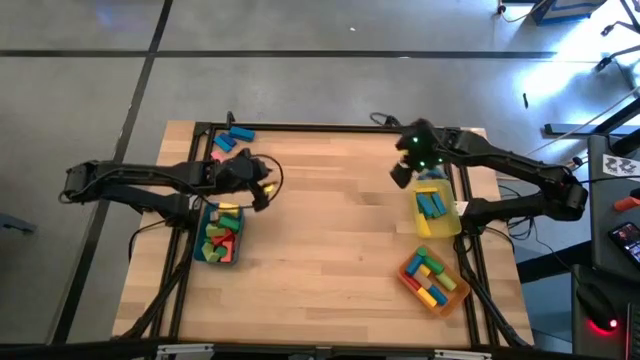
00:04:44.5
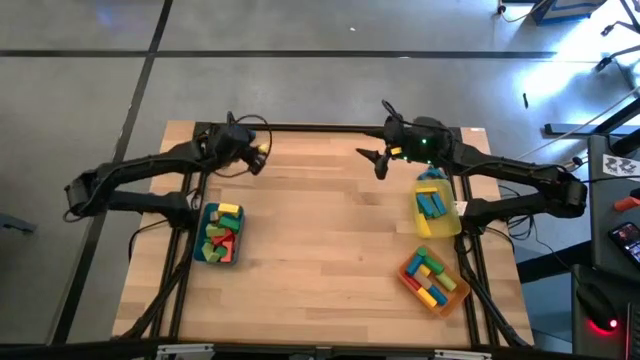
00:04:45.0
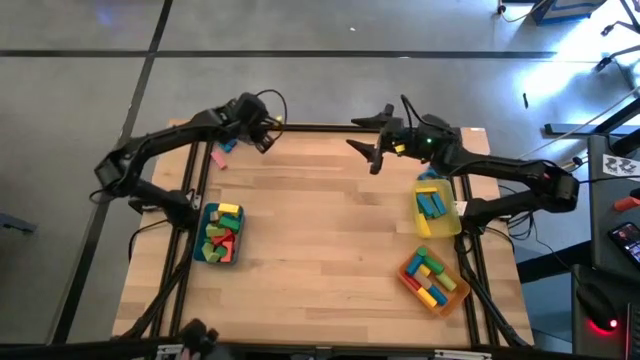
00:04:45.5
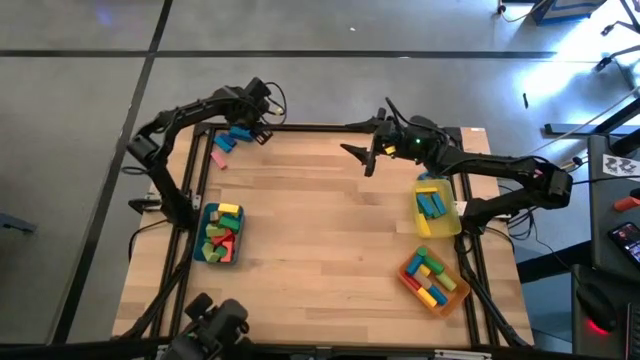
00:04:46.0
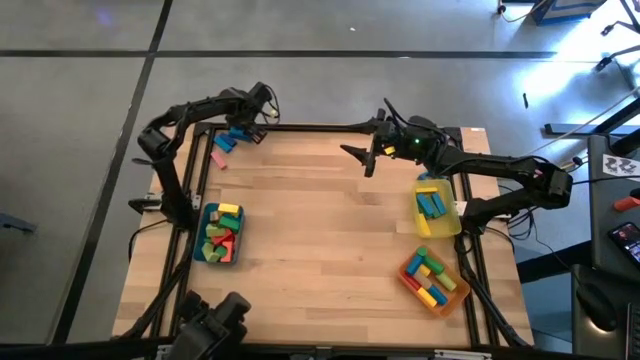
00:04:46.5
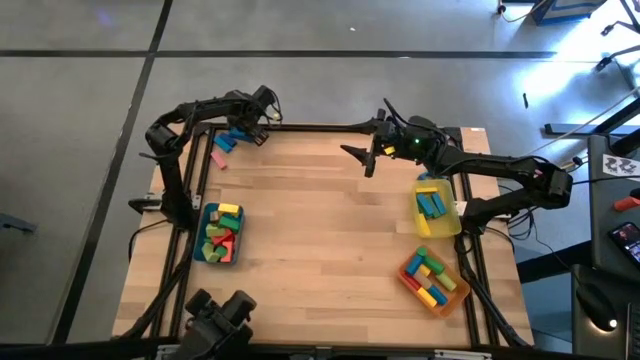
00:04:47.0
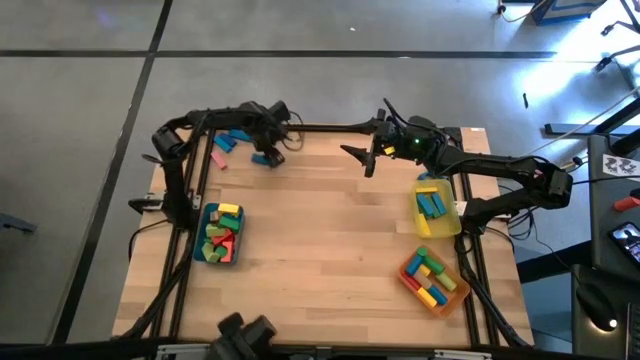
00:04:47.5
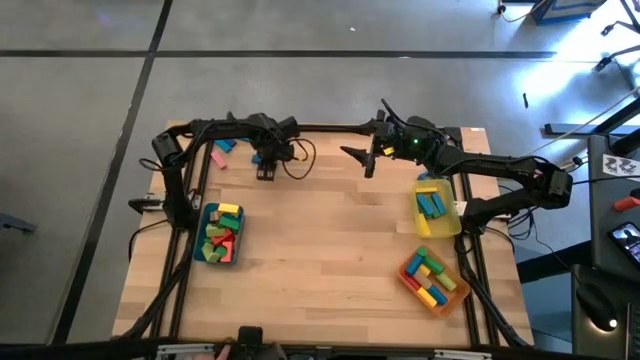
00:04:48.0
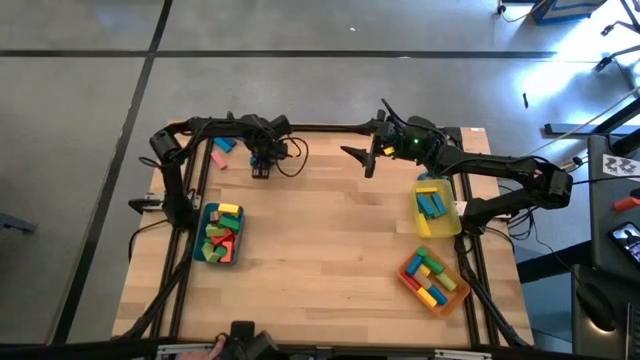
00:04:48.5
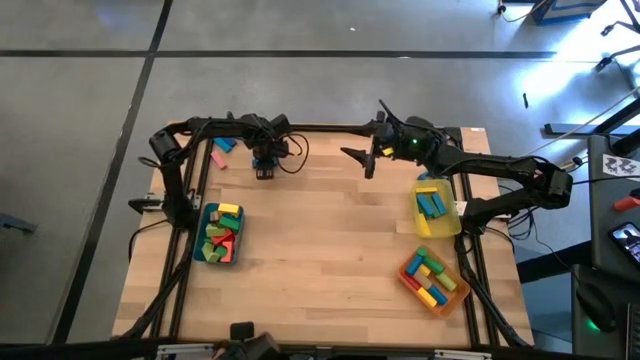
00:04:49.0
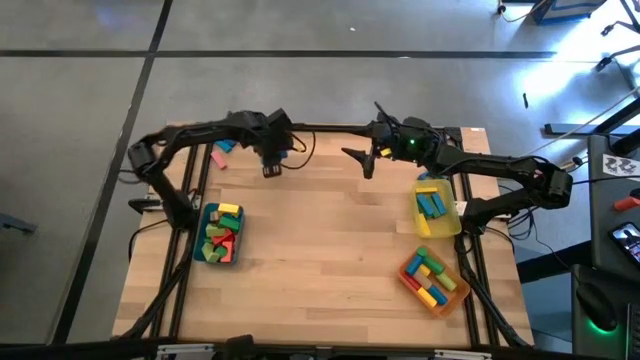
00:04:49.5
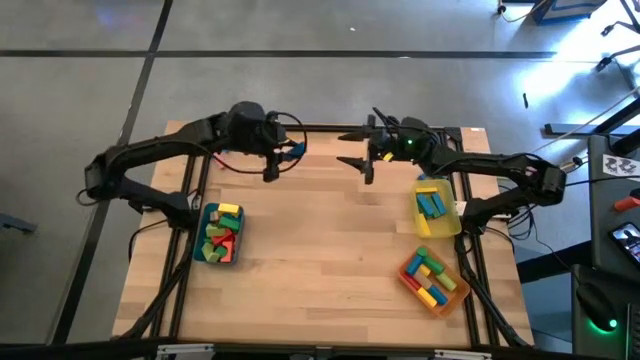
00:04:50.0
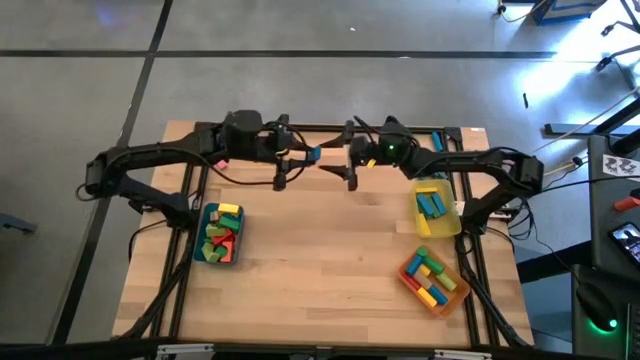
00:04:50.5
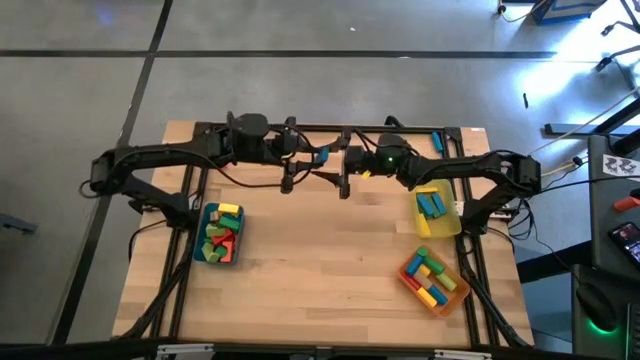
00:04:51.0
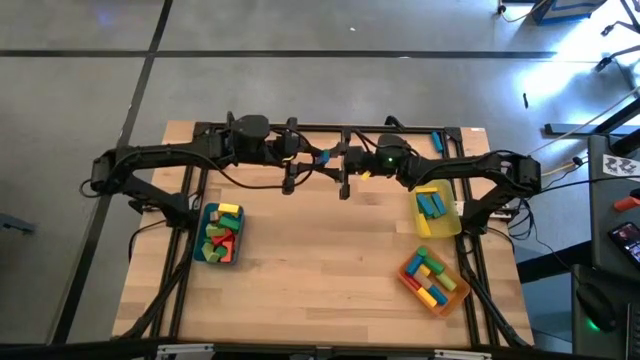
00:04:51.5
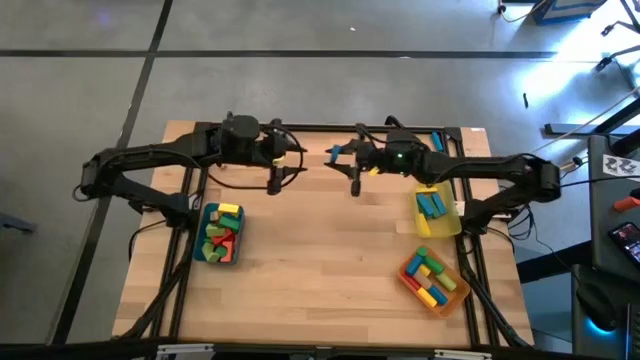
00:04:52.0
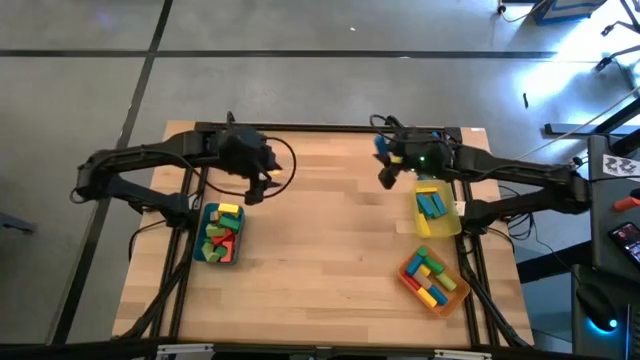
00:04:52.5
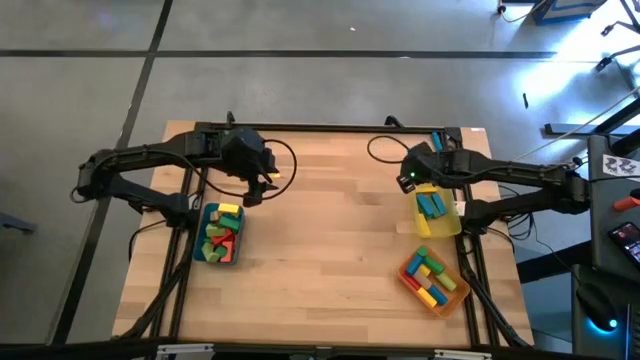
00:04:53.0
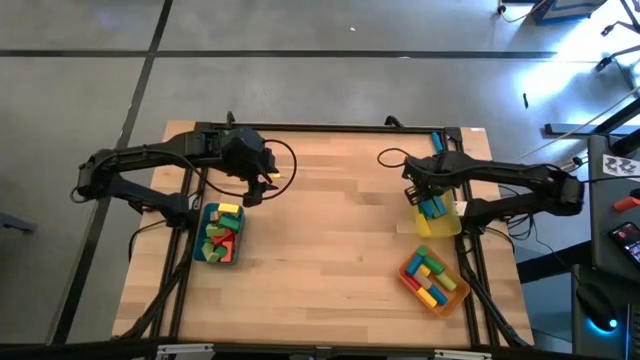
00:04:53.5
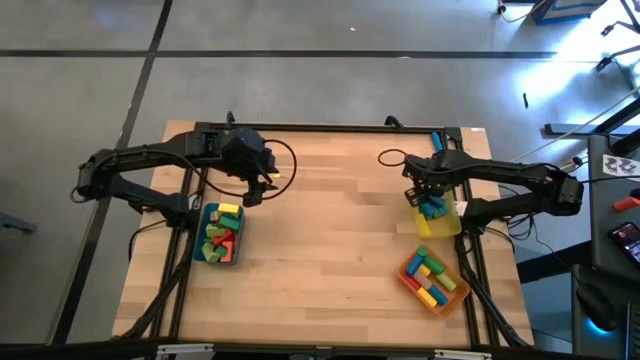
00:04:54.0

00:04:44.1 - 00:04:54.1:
Task: Sort blocks by size
Put the blue rectangular block into the yellow bin

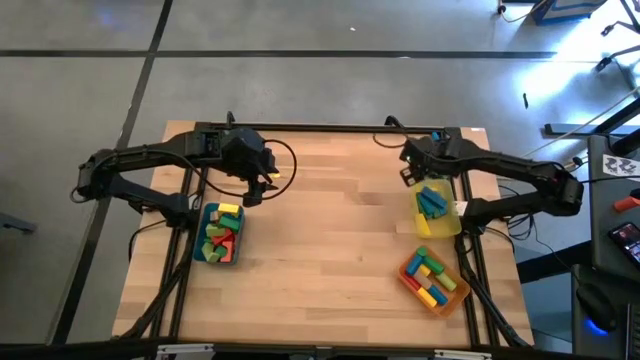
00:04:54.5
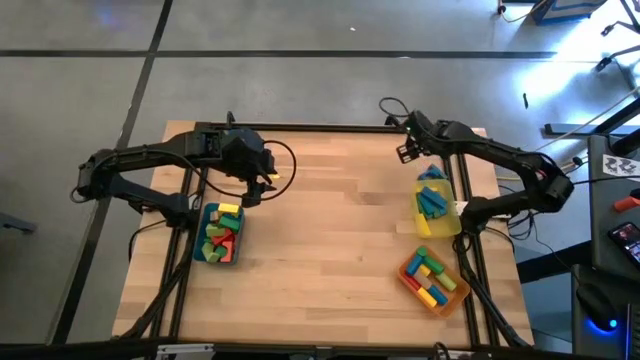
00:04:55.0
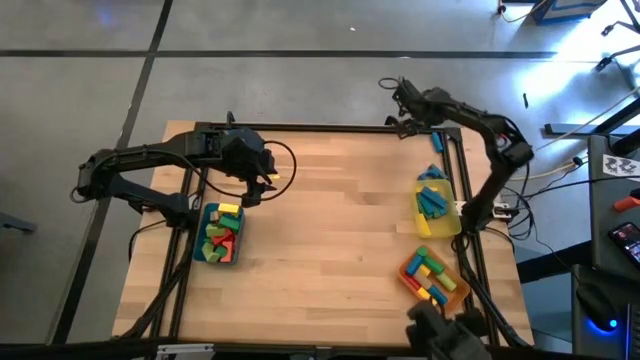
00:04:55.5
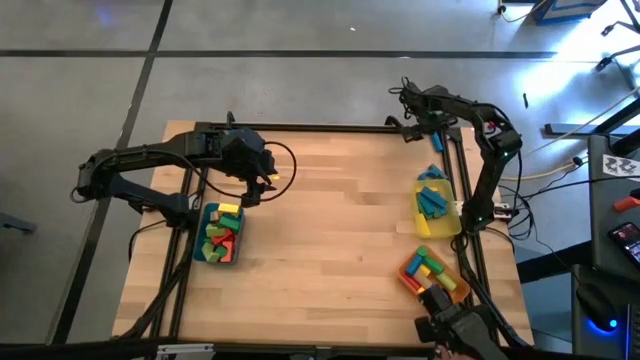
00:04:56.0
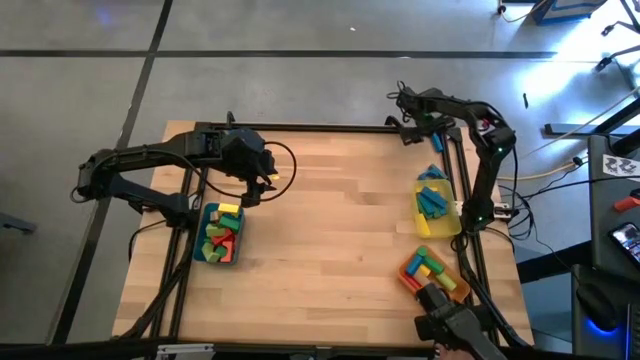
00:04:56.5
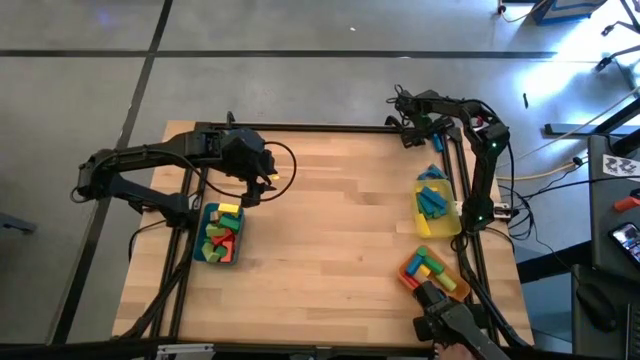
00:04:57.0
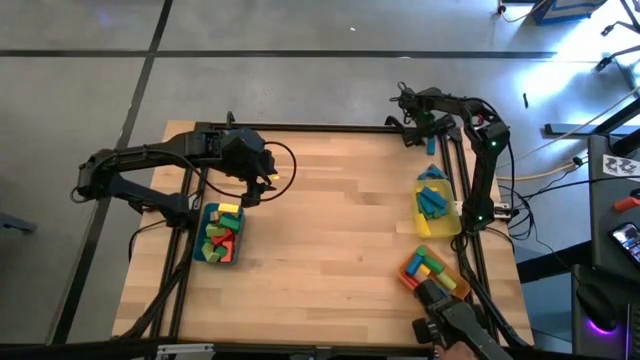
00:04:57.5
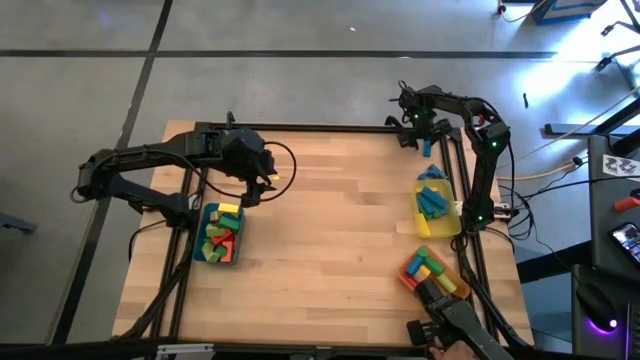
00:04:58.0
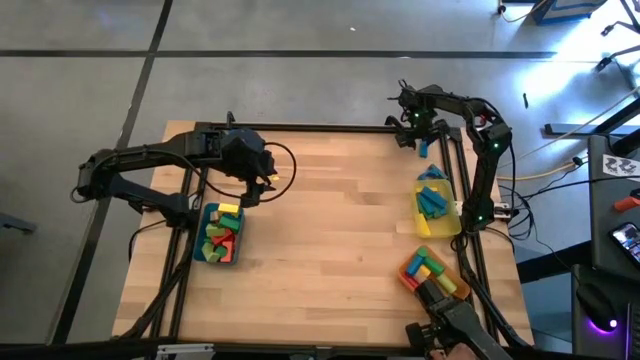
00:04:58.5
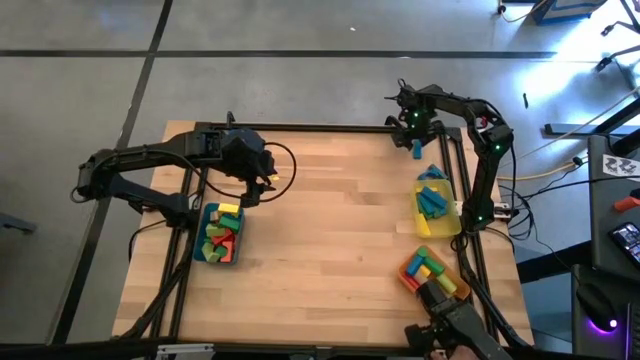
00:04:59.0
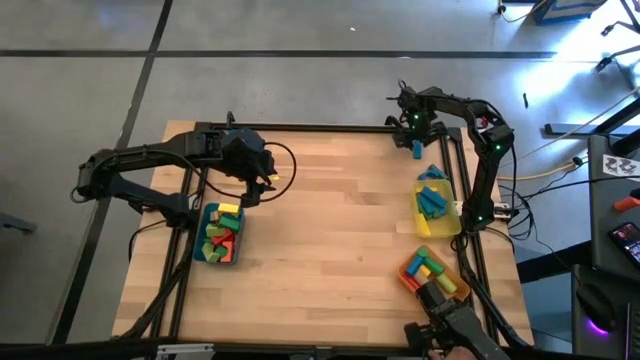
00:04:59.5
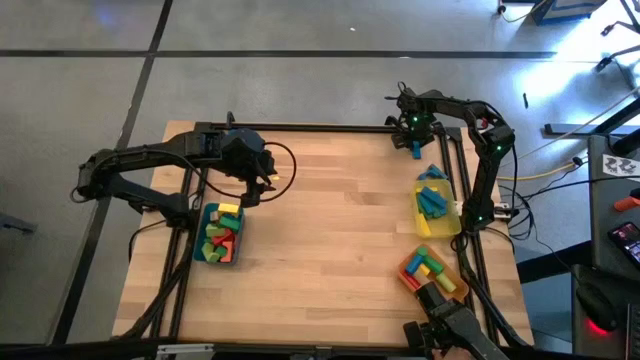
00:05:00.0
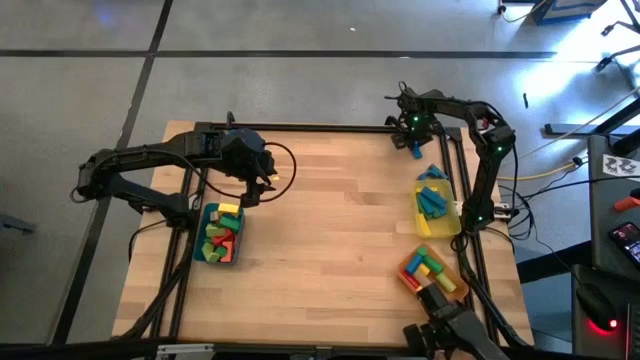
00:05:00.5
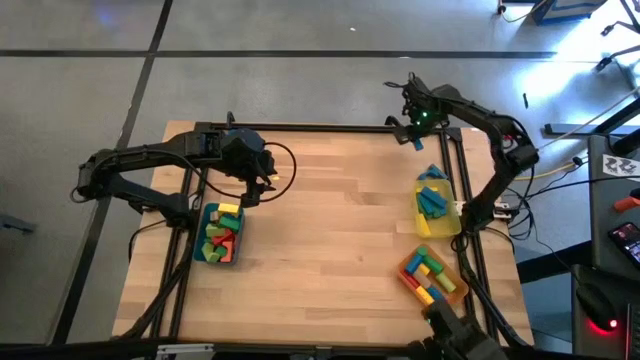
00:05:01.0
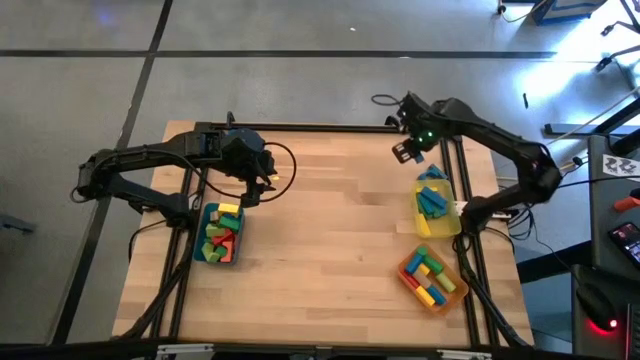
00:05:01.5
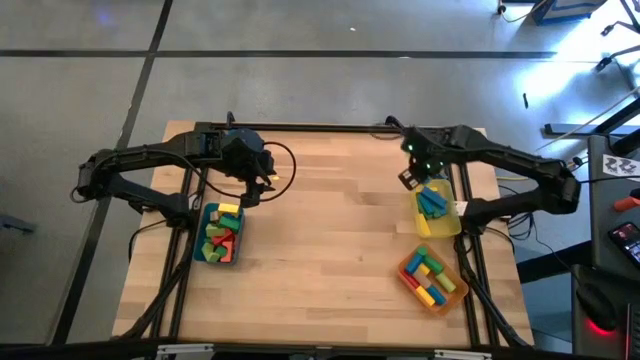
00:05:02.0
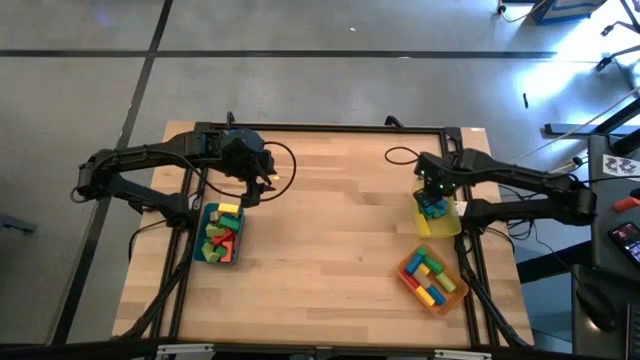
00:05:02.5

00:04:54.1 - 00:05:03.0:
Put the blue rectangular block into the yellow bin

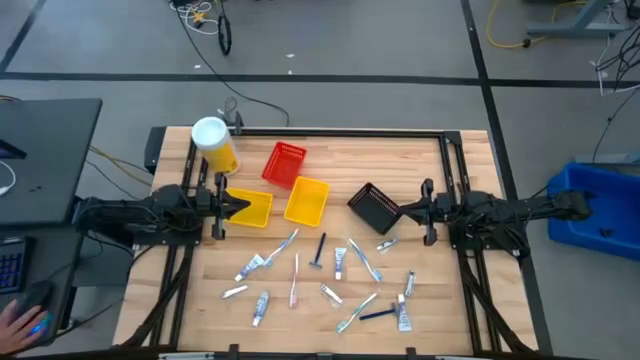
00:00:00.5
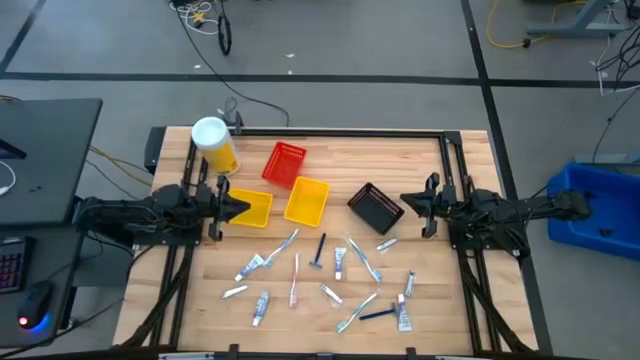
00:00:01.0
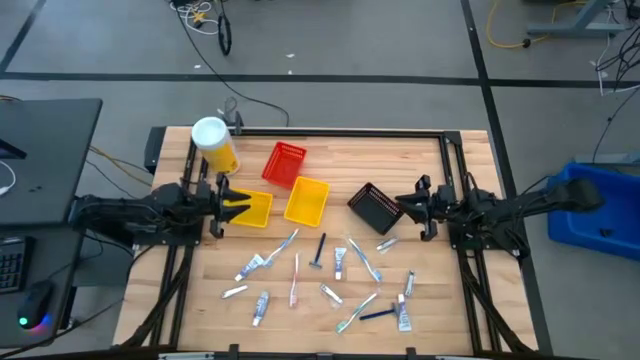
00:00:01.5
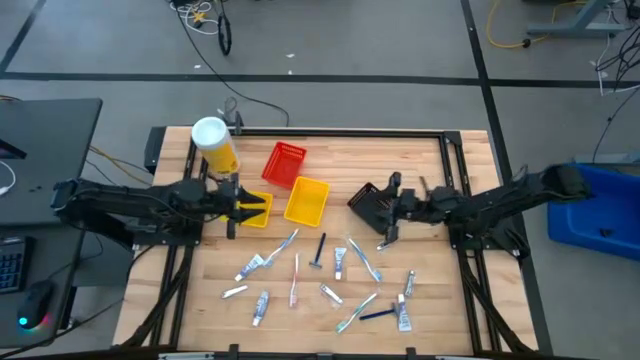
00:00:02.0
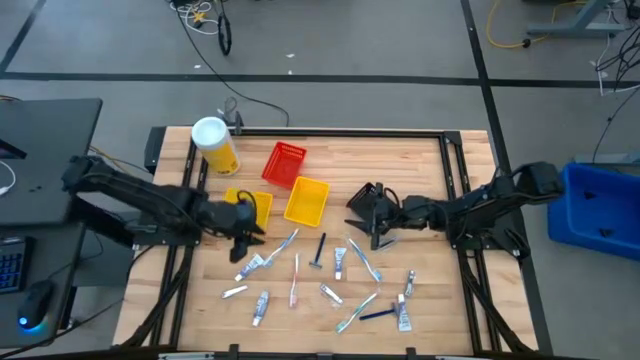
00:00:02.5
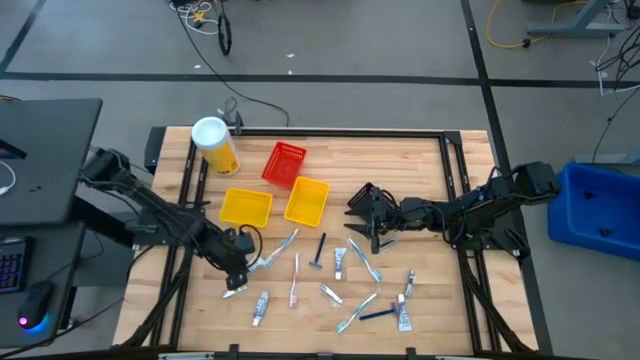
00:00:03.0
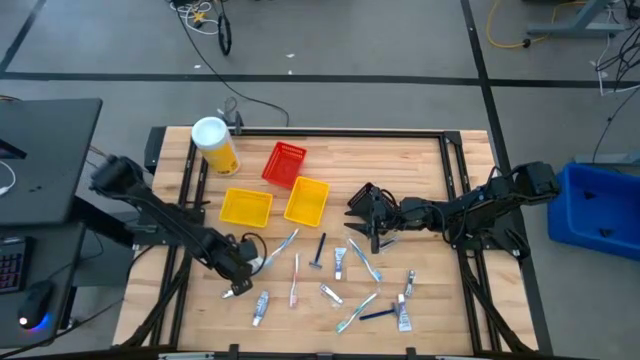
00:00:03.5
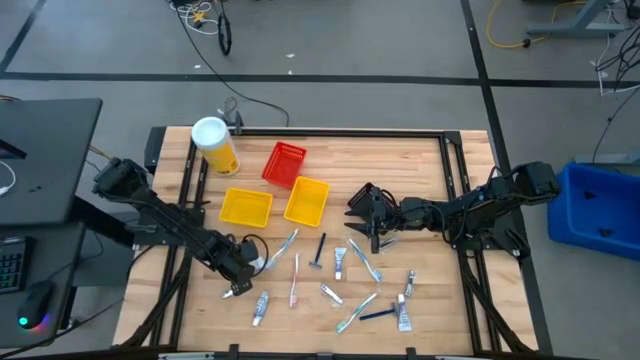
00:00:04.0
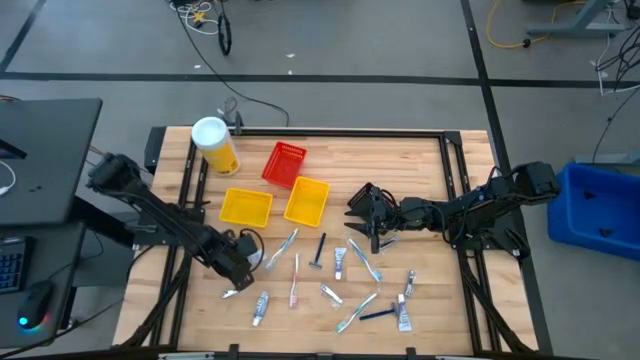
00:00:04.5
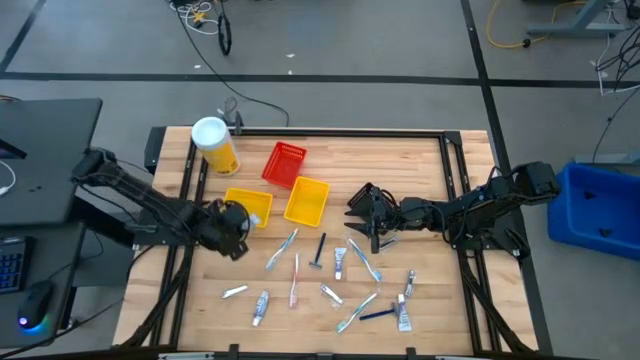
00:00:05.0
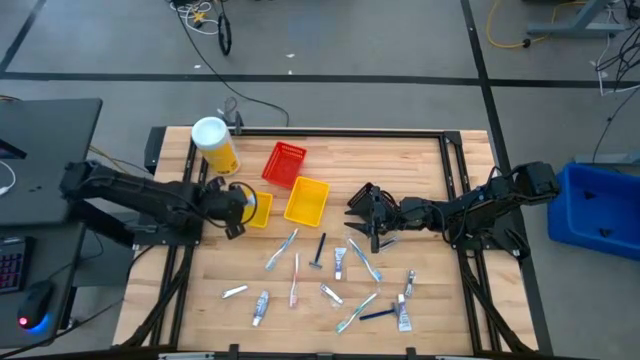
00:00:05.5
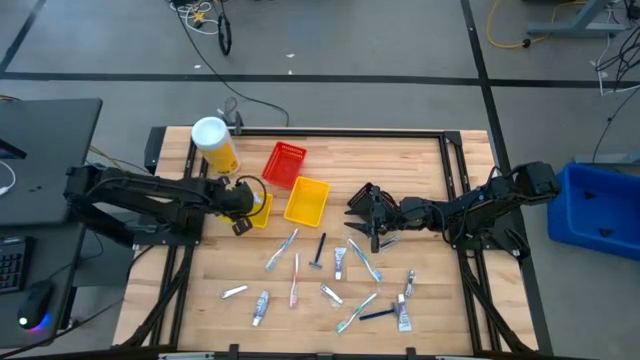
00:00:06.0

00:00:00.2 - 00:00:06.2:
Task: Pick & Place Travel size toiletries
Put the white toothpaste into the left yellow bin
